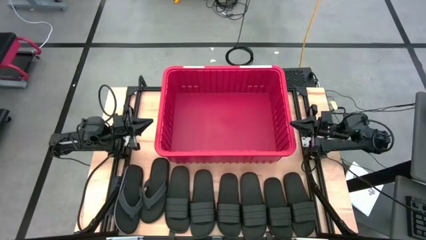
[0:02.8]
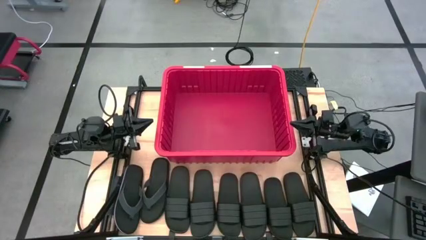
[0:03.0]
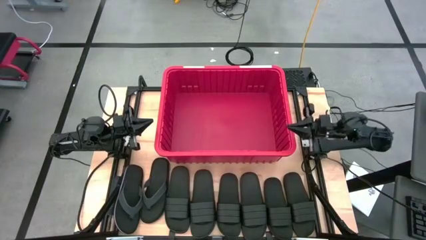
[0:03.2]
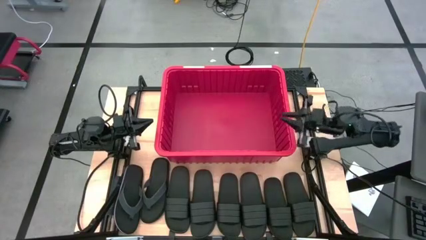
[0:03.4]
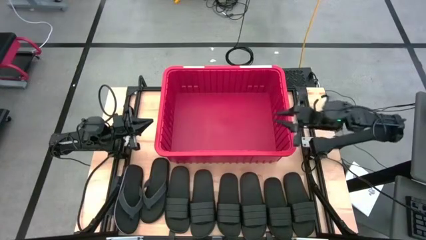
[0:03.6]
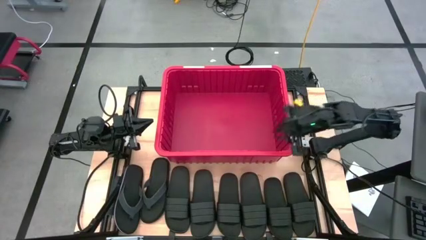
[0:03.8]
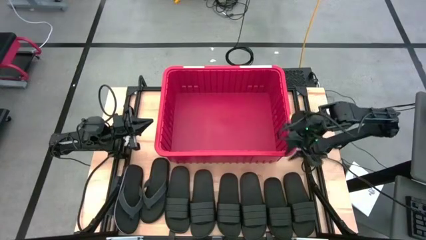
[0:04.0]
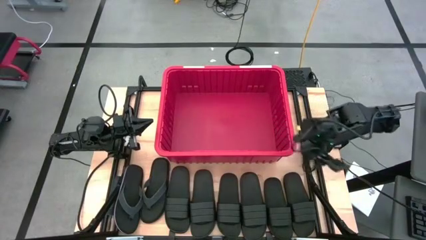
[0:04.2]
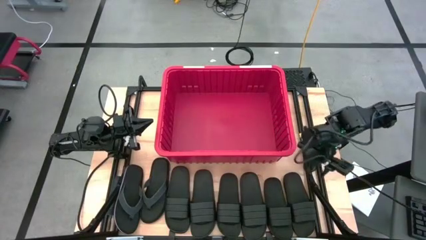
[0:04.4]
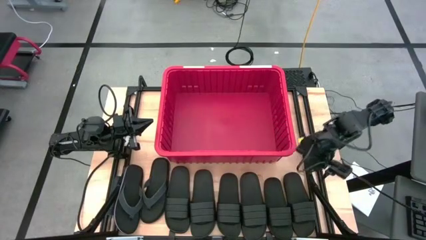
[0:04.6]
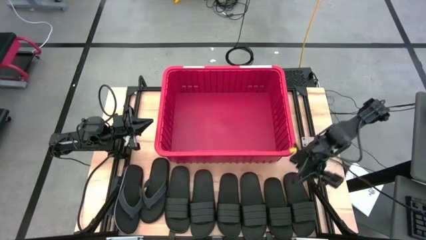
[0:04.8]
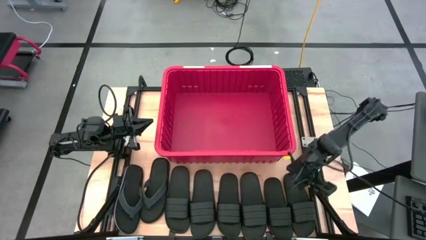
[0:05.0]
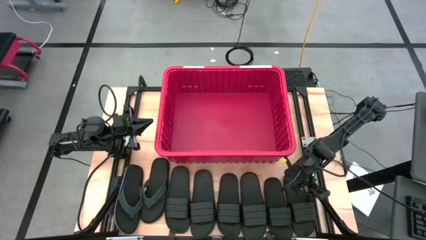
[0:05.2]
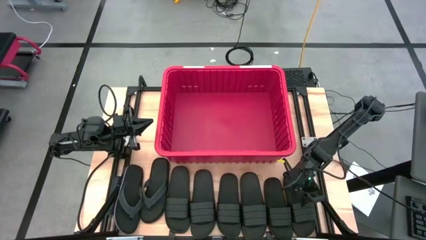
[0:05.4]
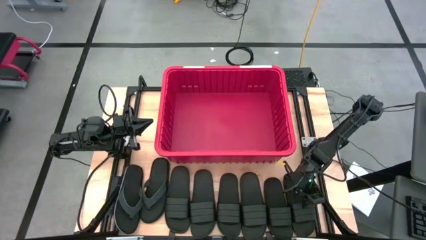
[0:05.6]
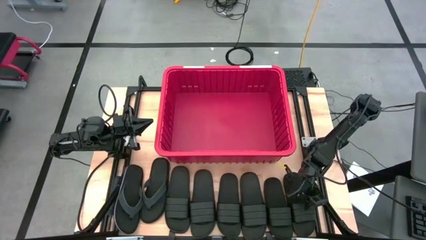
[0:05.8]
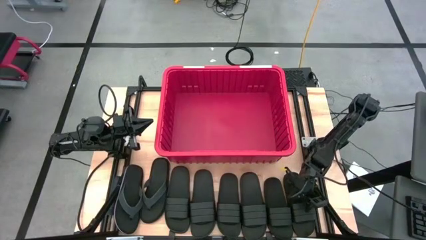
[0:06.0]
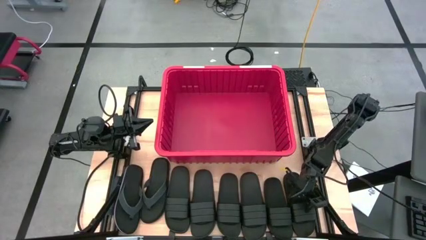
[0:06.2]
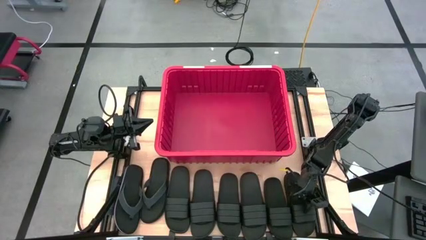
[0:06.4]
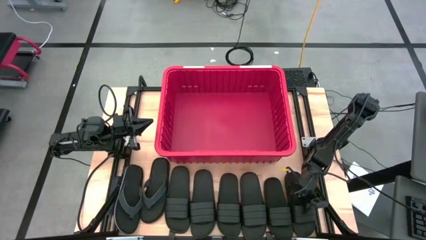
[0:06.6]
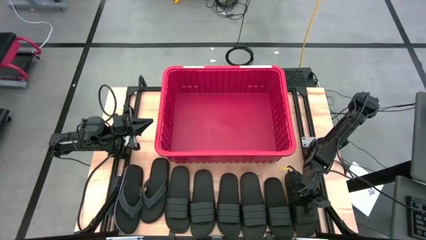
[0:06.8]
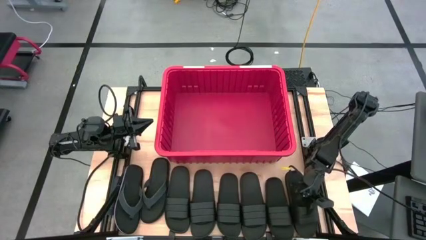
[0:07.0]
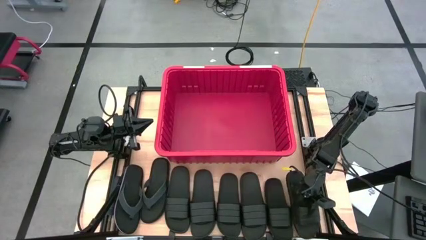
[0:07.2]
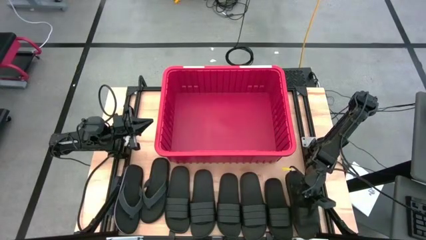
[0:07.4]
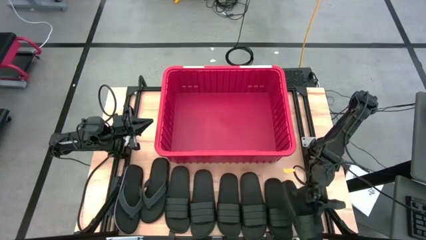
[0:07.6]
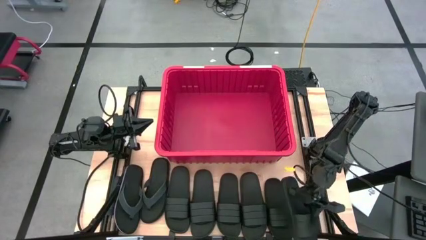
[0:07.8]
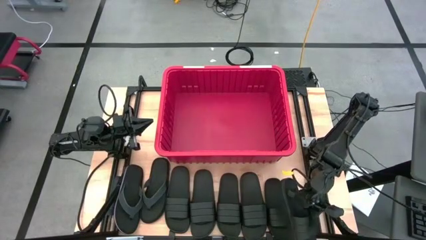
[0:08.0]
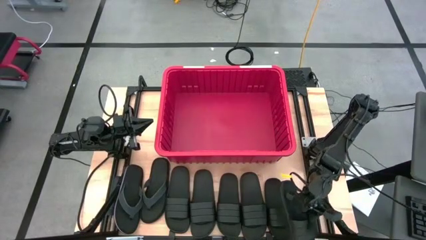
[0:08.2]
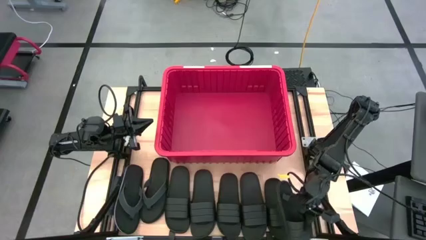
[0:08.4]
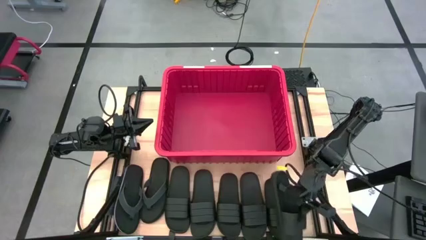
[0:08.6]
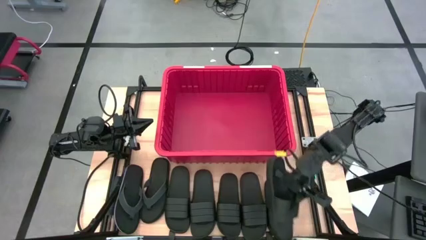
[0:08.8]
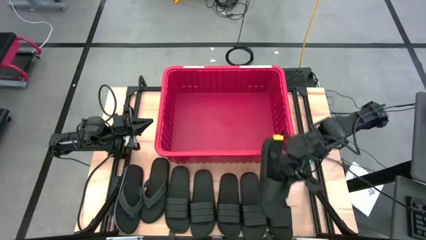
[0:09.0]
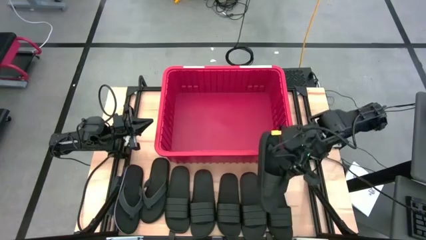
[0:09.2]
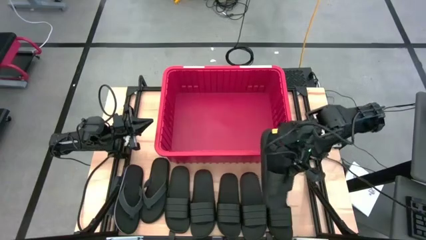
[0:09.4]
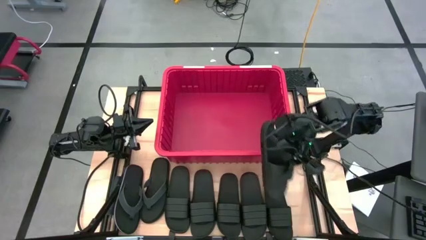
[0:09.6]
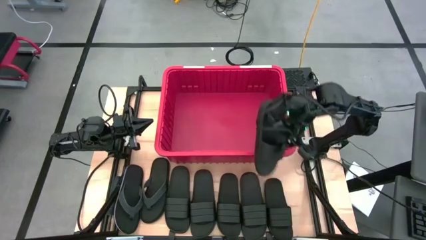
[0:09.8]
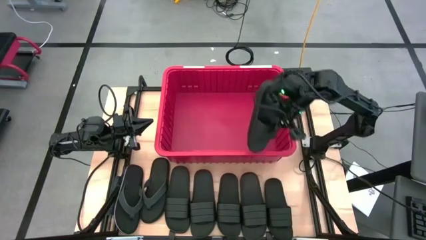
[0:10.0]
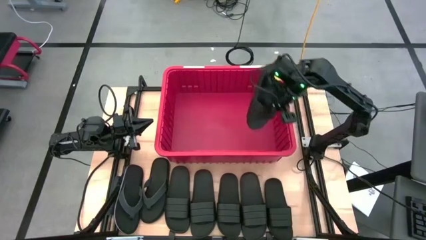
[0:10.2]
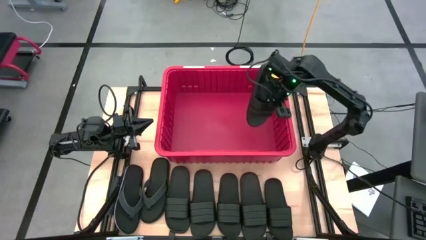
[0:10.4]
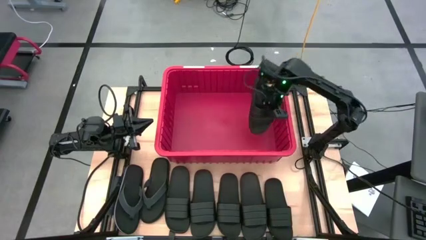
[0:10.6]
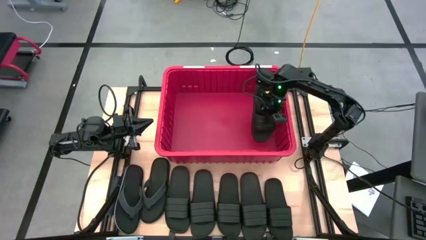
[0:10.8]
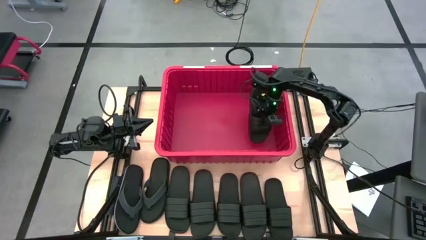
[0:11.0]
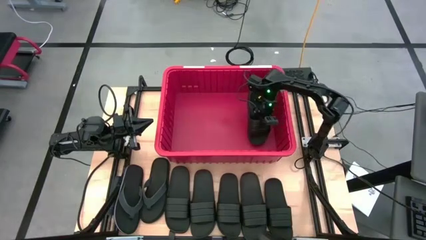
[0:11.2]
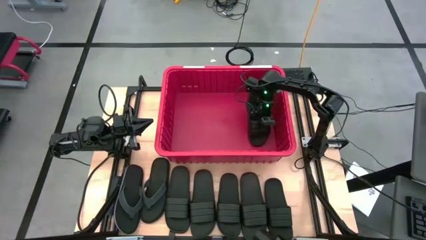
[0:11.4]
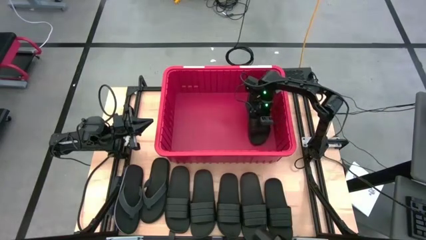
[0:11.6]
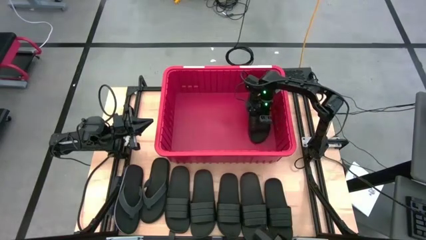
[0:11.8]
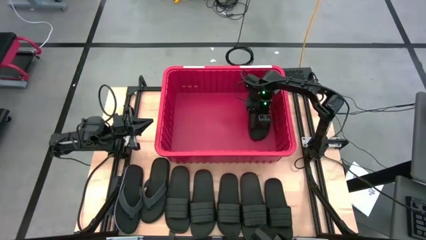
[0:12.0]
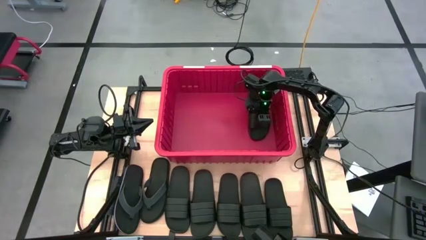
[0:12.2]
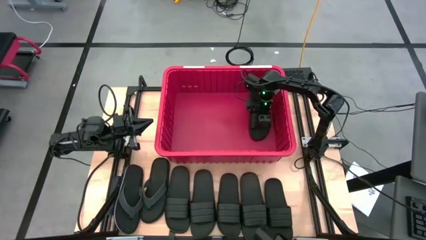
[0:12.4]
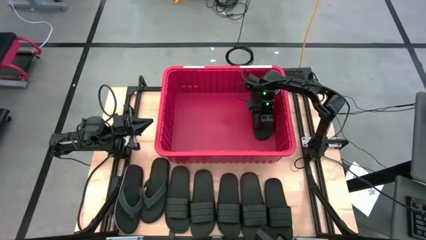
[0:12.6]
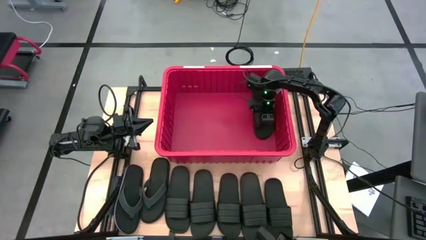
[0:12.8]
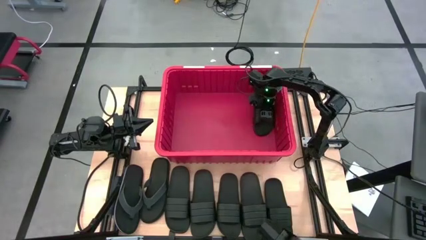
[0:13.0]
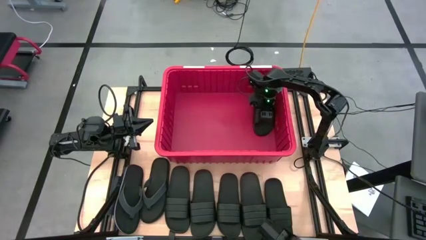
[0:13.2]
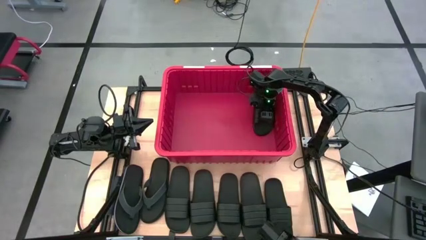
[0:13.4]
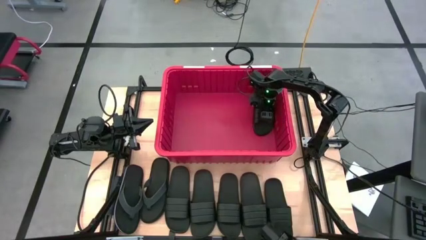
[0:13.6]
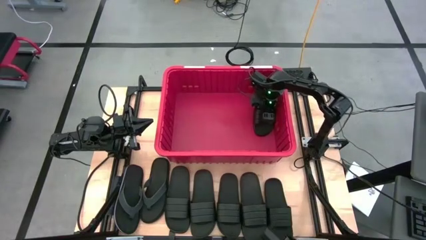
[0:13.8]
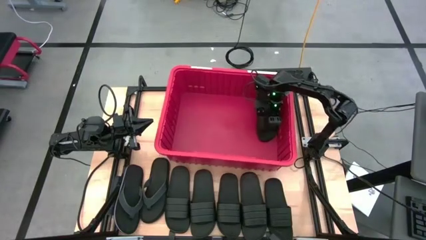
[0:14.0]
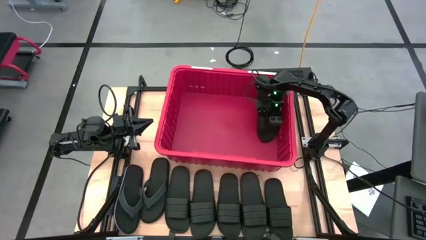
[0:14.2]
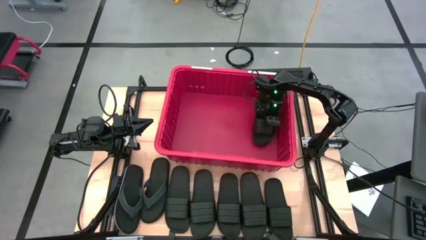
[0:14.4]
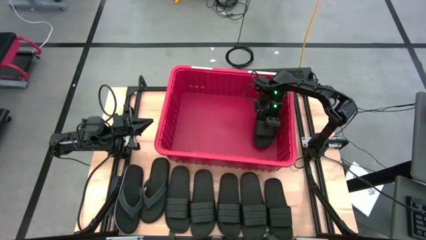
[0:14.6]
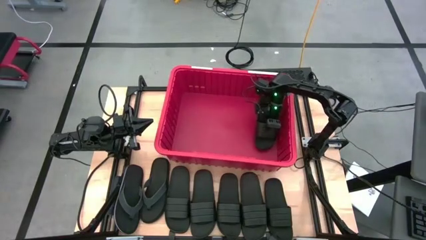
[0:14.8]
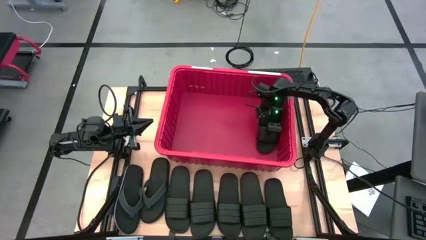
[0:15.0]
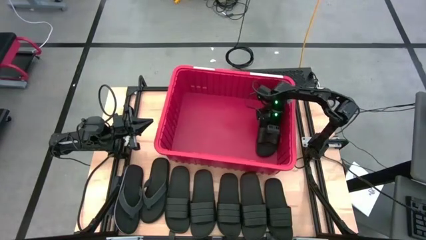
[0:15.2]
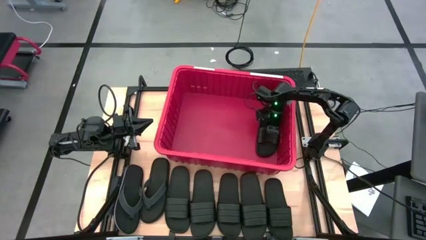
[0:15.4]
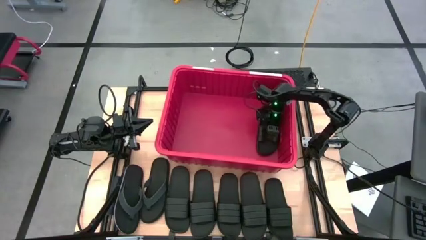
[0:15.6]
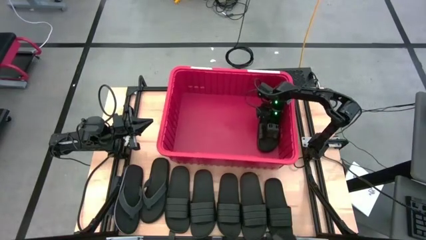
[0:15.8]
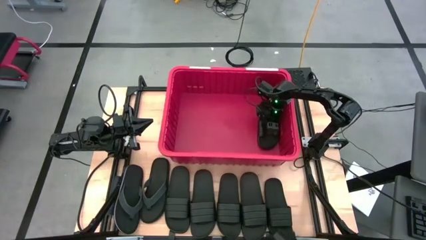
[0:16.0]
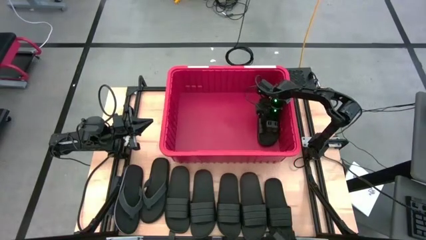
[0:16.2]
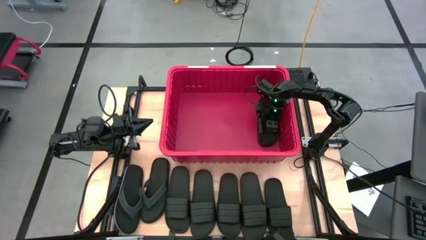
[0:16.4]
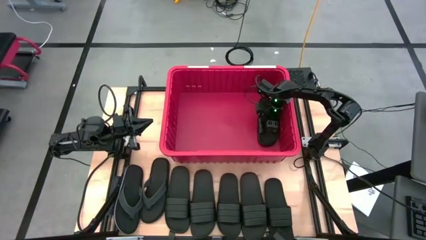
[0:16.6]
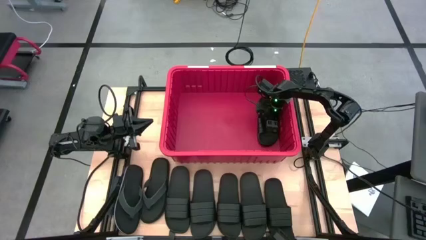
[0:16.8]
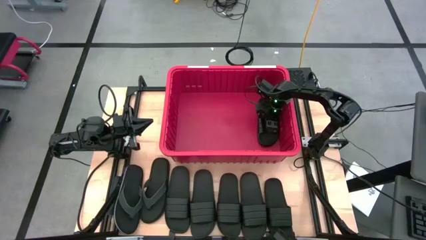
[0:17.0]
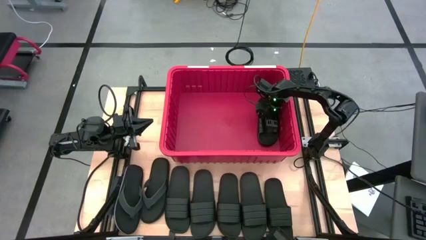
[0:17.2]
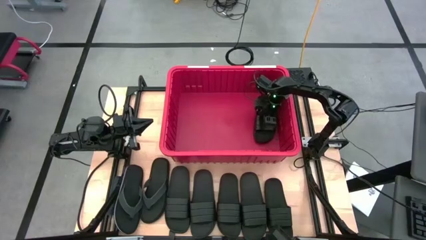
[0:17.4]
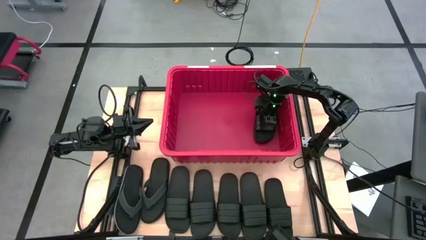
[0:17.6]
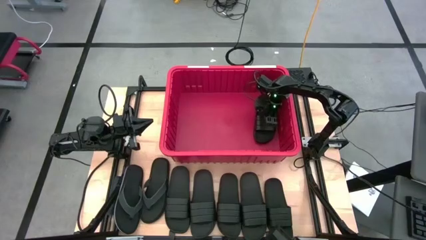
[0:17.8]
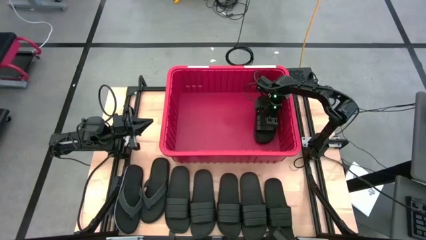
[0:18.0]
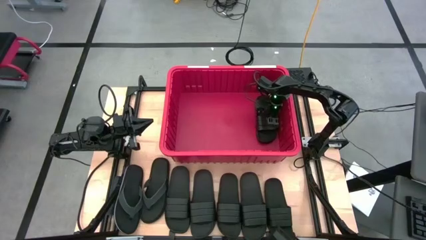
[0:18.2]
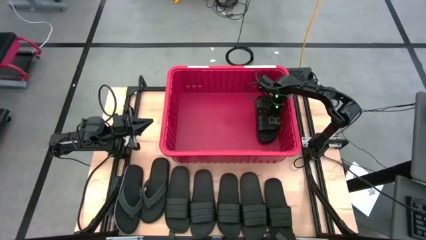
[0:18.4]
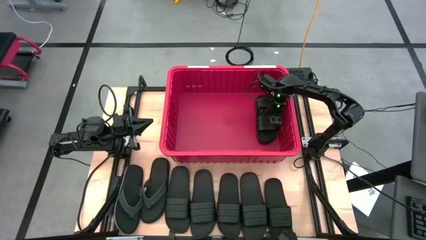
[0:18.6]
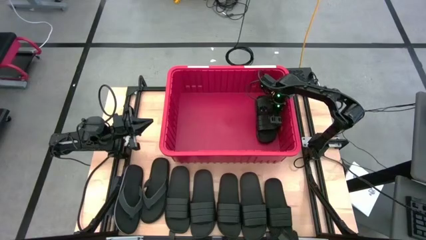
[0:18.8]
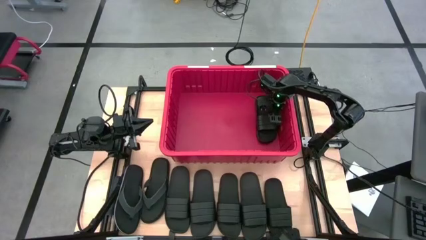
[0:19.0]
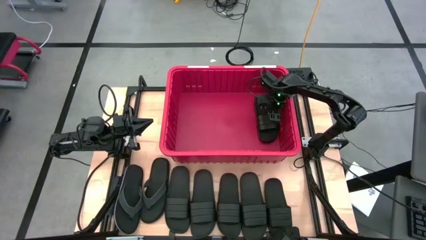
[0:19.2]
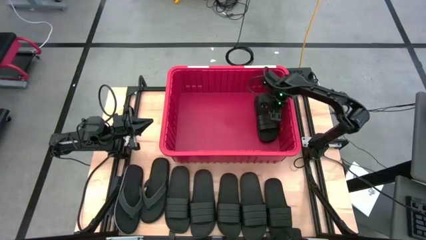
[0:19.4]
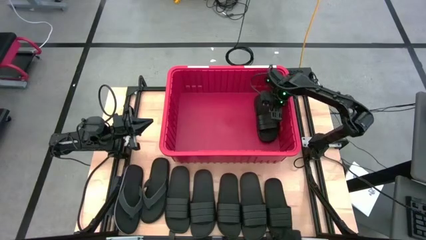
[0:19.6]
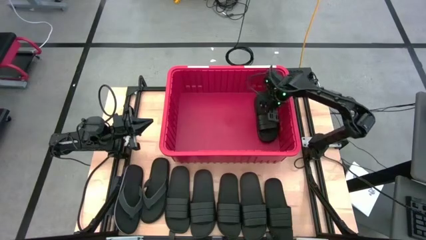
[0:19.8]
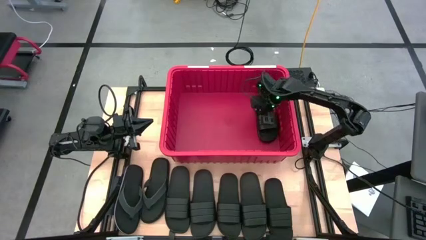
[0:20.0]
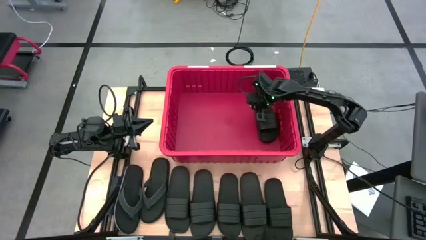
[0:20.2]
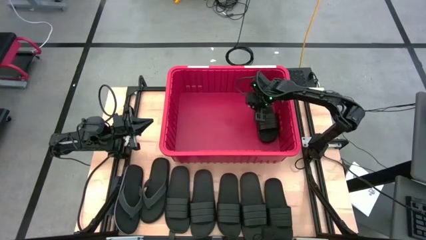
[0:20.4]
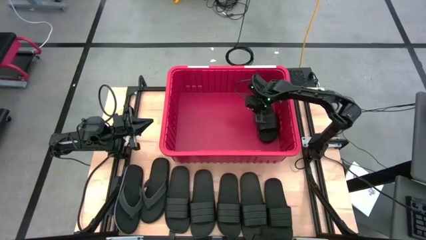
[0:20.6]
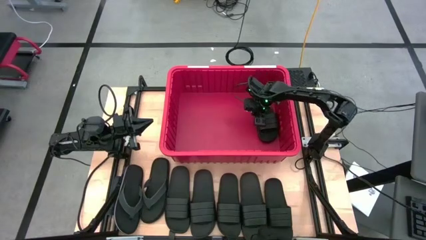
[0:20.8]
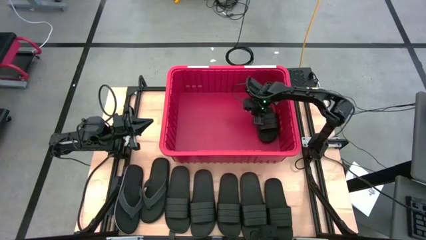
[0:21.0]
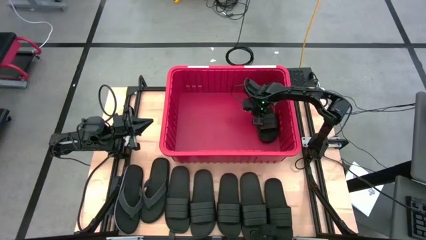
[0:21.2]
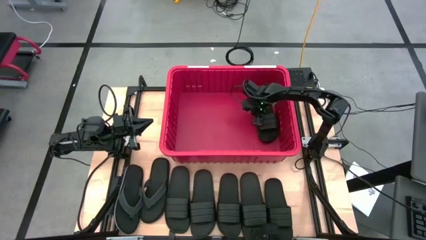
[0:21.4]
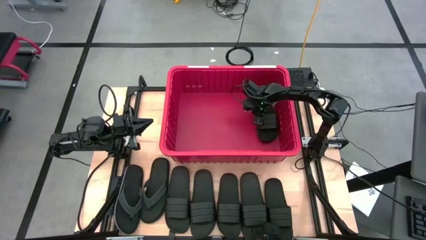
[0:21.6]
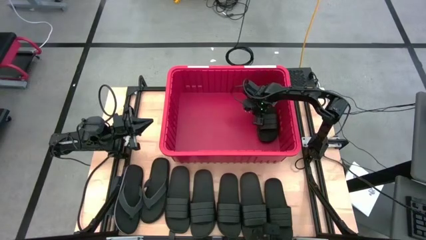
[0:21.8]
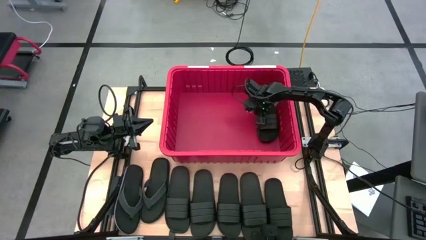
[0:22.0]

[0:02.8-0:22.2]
Task: Pick and place slides into bin
Put the black slide into the red container
